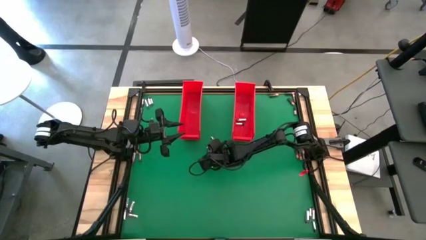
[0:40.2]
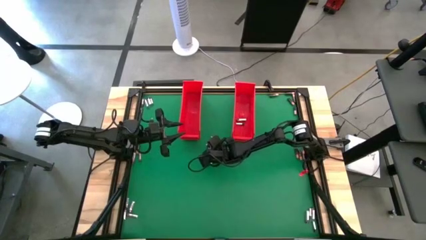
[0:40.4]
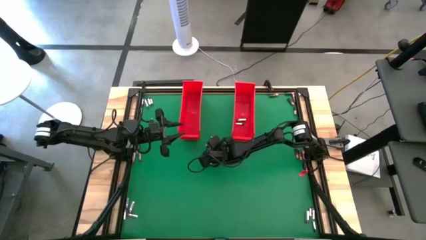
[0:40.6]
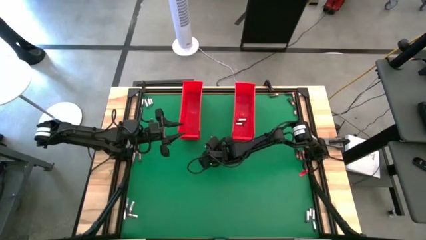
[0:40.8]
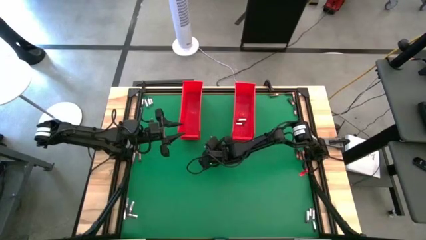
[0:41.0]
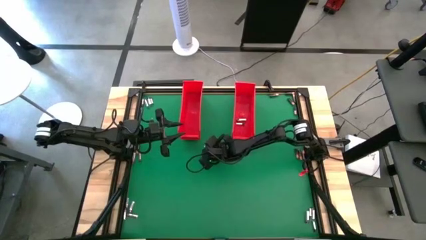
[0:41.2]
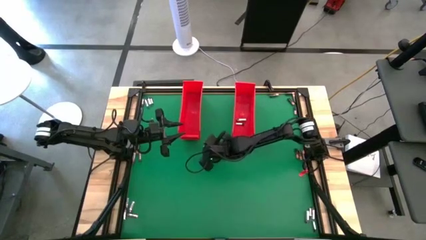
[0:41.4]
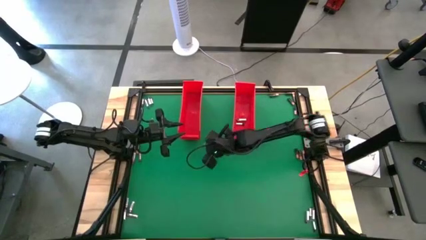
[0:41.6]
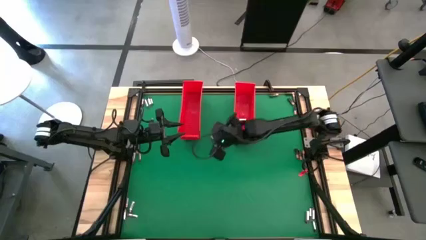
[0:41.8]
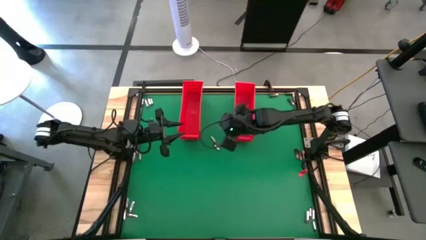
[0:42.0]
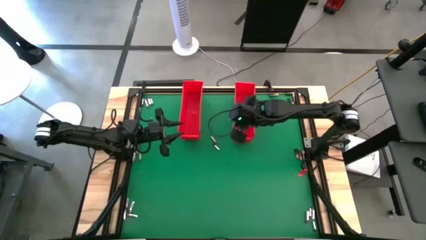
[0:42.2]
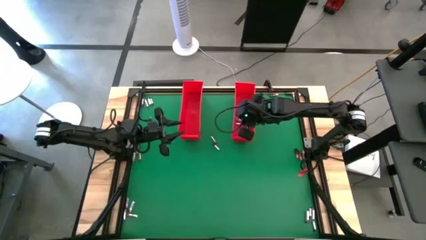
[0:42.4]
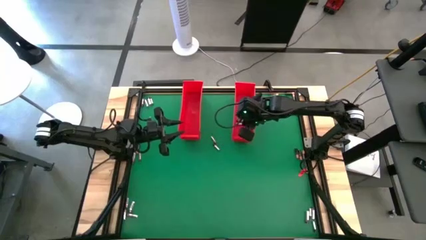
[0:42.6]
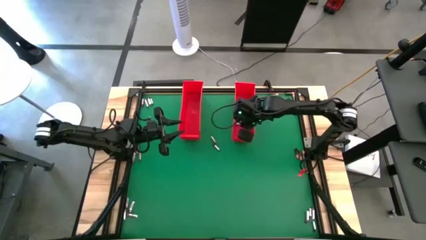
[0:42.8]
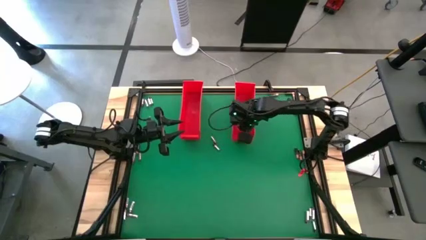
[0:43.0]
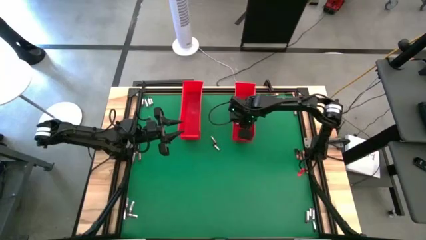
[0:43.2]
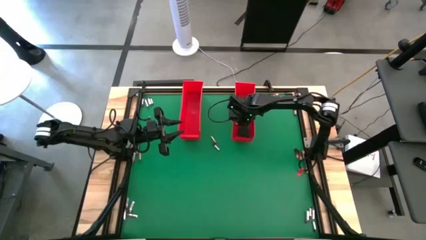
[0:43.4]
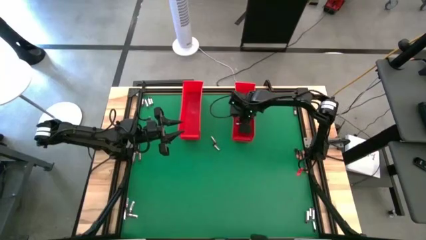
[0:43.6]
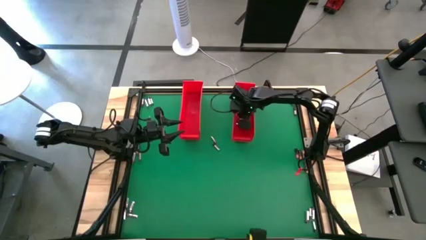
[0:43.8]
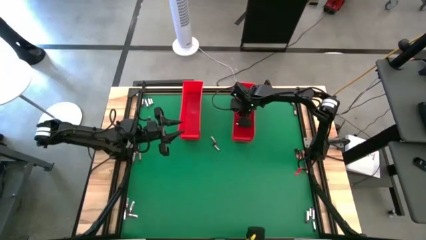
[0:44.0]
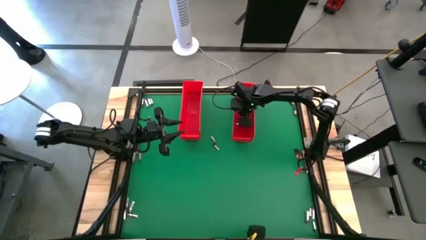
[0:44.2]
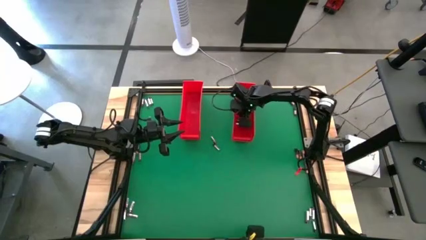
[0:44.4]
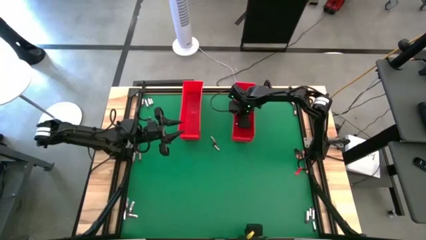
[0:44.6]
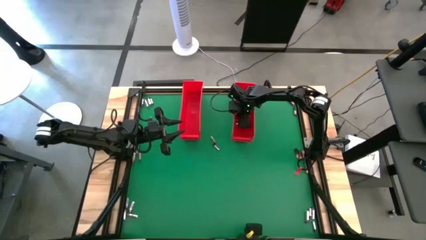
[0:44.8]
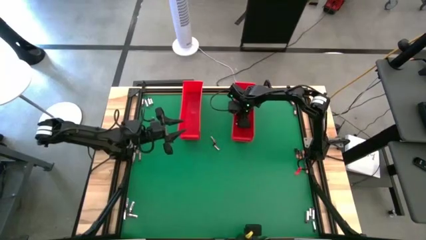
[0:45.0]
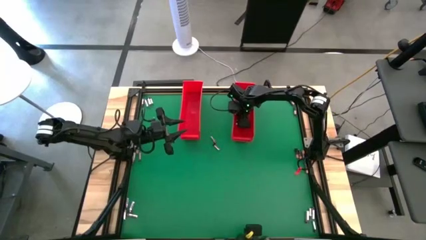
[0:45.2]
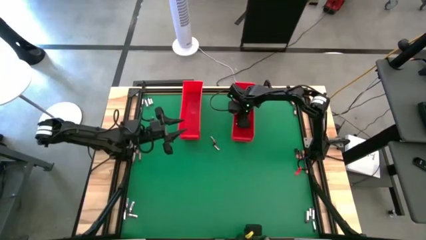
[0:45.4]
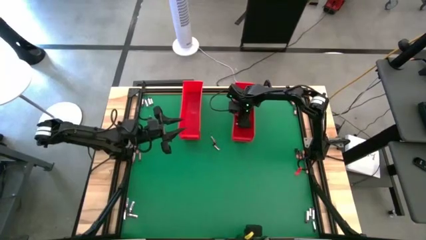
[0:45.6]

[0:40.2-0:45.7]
Task: Sort batteries
Put the silver battery into the right red bin

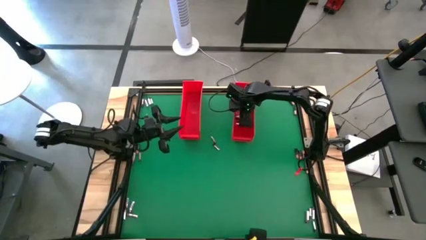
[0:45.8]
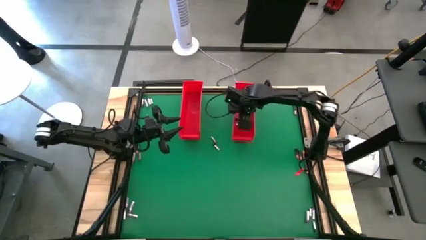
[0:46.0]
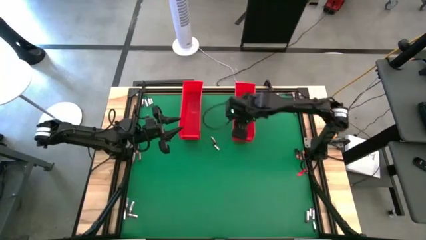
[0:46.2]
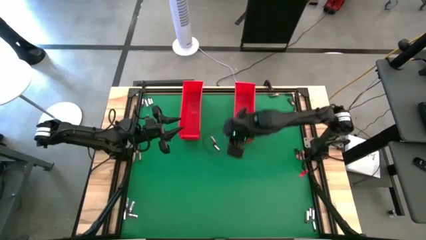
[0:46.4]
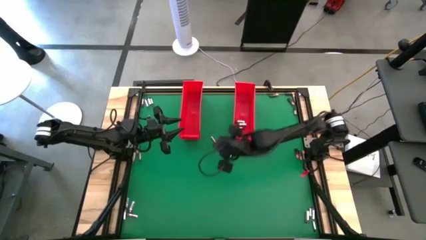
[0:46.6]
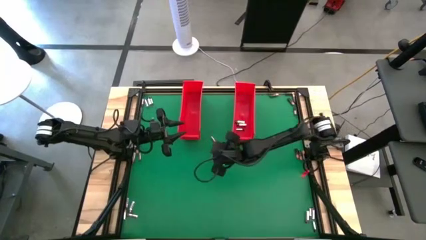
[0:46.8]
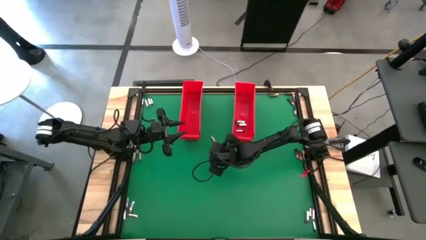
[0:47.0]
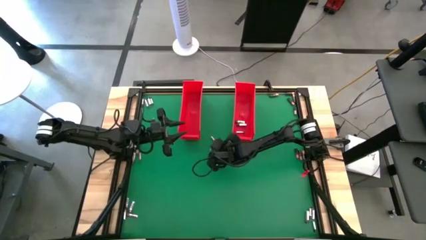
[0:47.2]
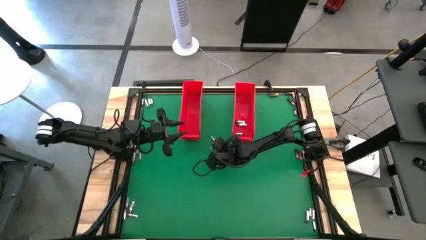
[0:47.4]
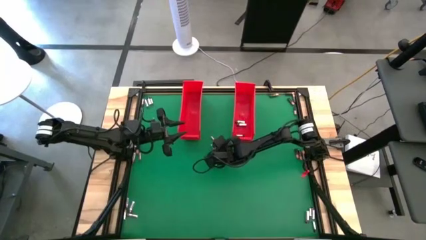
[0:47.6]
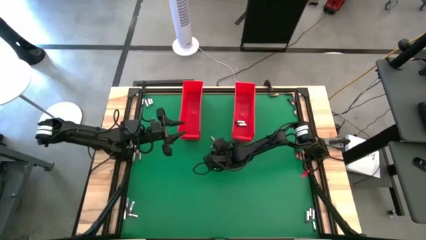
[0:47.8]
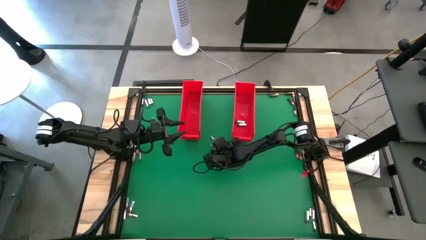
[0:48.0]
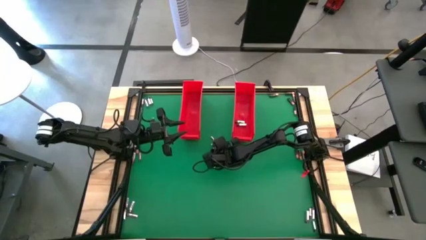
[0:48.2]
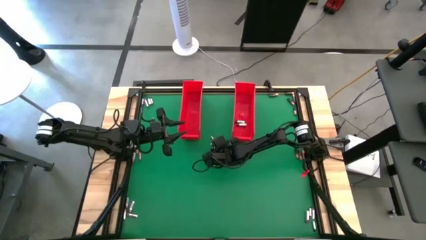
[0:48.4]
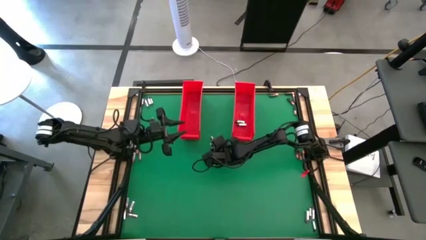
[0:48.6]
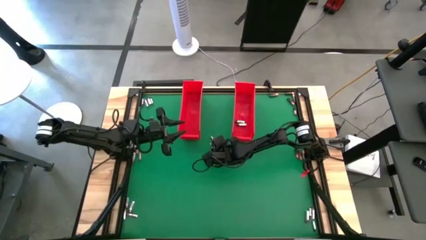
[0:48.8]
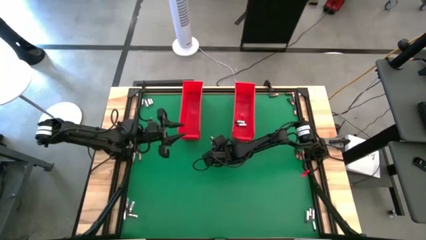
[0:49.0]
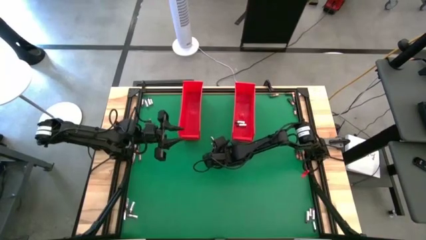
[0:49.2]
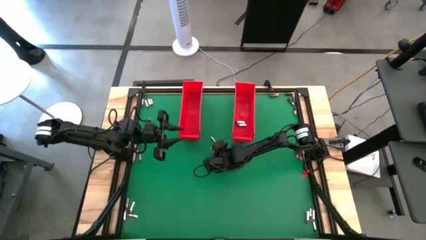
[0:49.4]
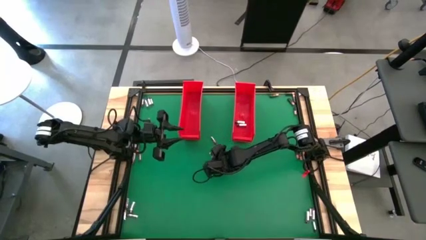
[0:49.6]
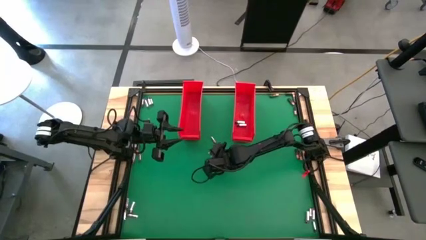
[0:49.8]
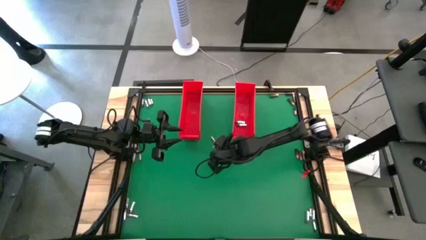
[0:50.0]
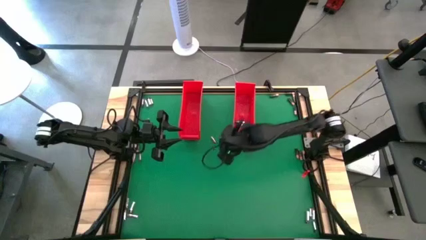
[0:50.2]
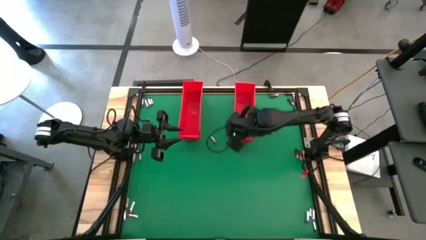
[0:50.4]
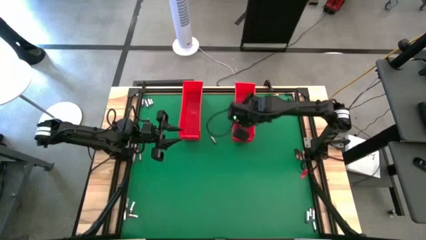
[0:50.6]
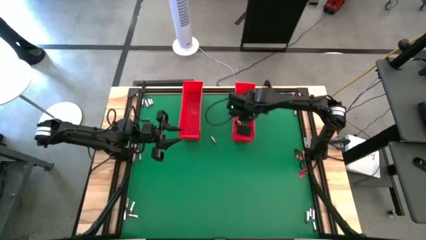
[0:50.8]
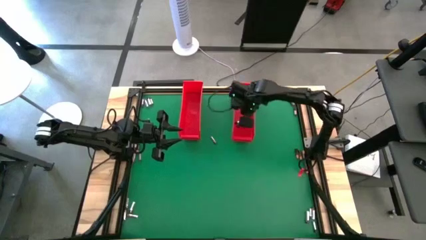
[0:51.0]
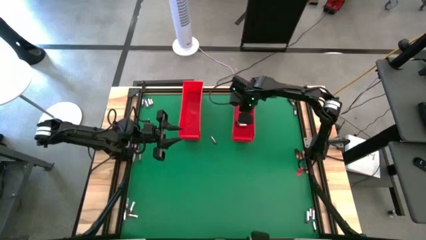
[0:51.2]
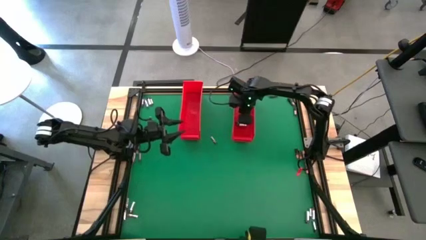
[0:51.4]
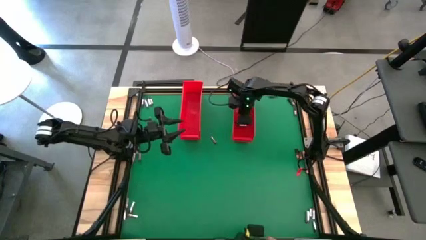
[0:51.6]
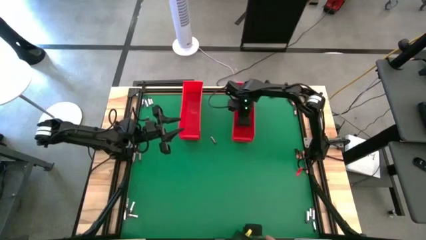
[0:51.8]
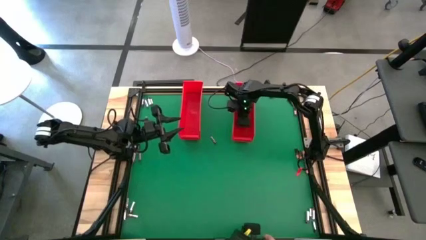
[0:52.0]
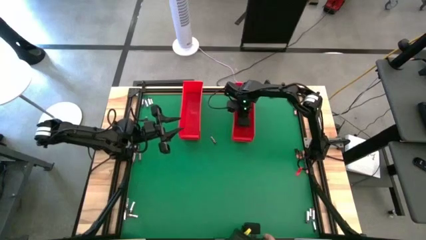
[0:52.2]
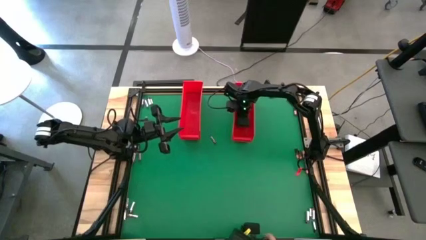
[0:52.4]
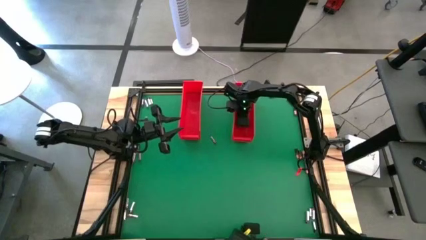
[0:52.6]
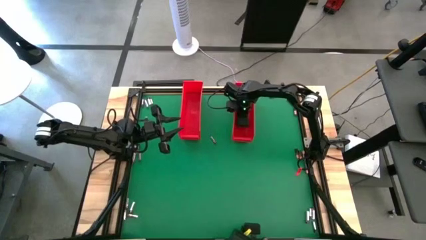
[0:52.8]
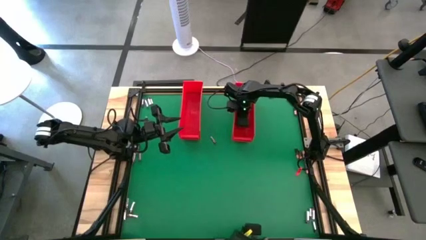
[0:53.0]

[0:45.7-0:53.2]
Put the silver battery into the right red bin

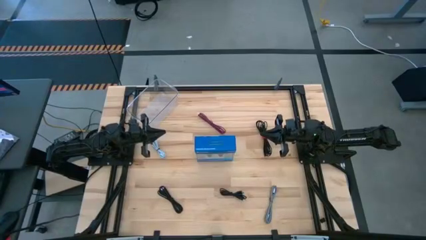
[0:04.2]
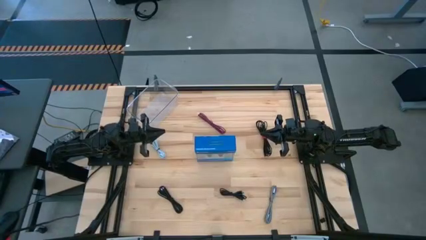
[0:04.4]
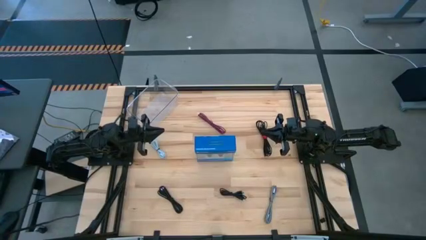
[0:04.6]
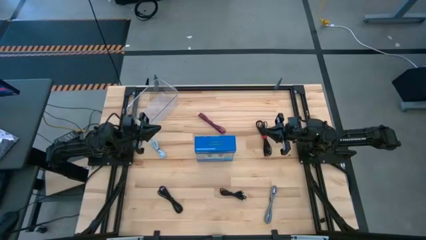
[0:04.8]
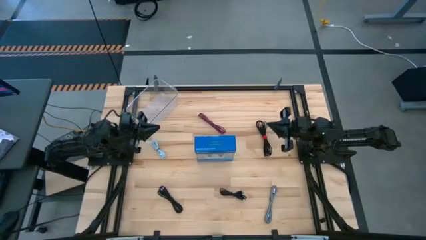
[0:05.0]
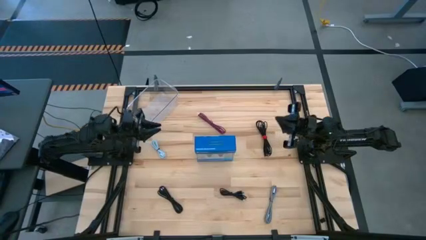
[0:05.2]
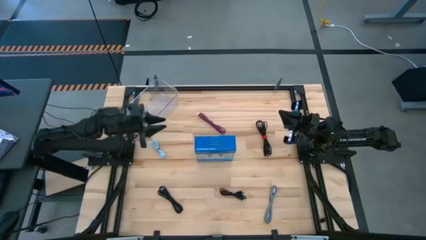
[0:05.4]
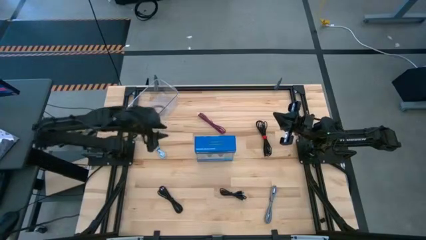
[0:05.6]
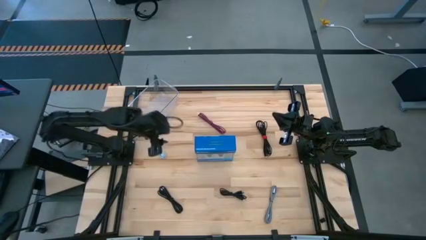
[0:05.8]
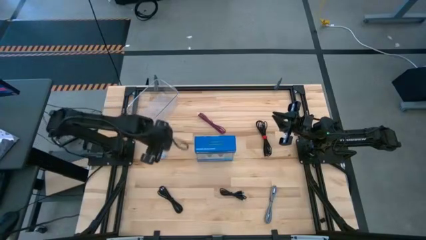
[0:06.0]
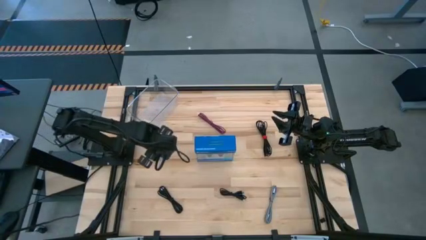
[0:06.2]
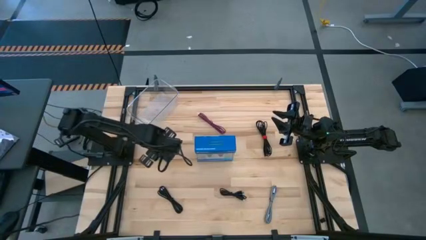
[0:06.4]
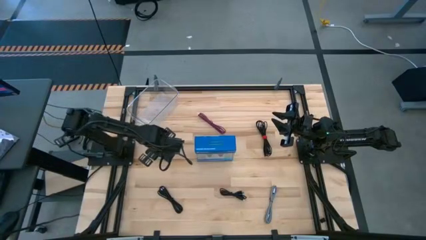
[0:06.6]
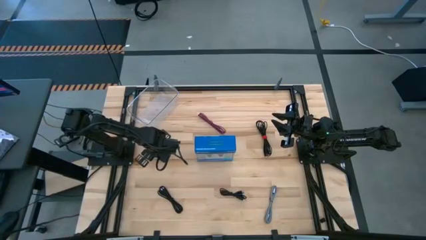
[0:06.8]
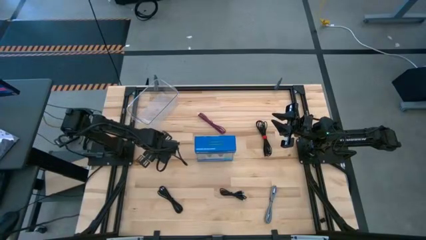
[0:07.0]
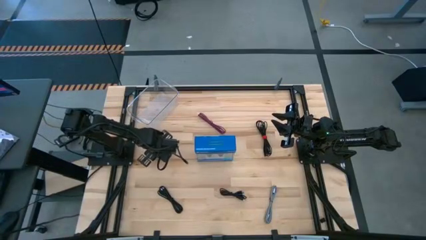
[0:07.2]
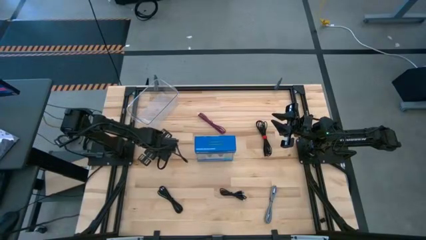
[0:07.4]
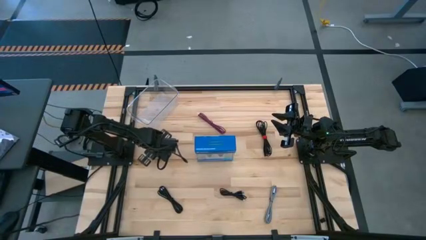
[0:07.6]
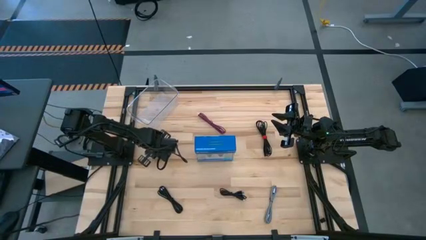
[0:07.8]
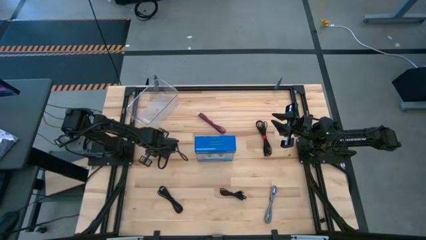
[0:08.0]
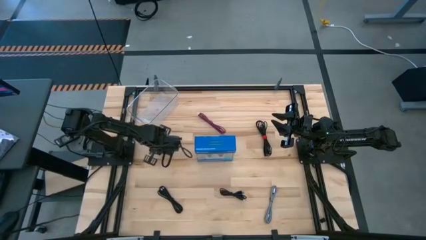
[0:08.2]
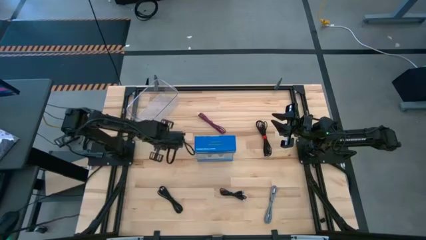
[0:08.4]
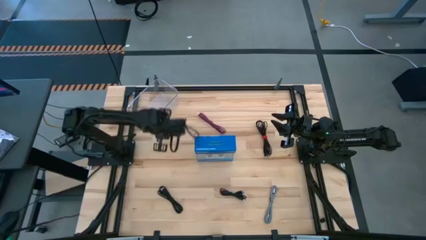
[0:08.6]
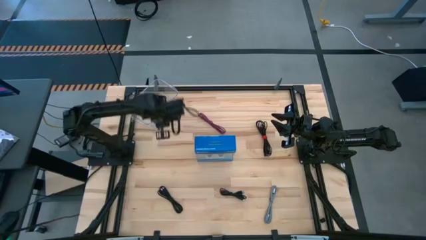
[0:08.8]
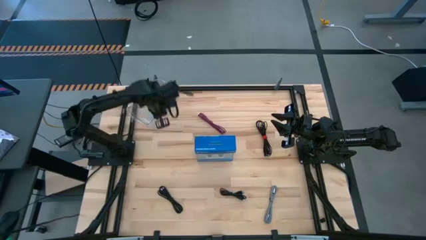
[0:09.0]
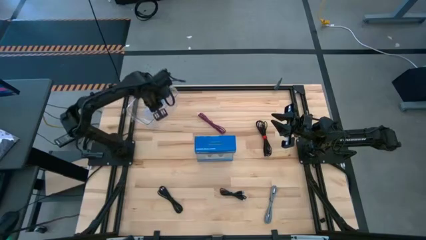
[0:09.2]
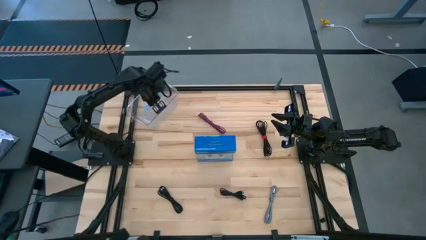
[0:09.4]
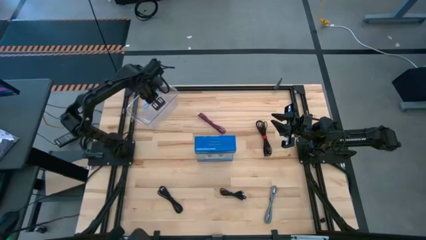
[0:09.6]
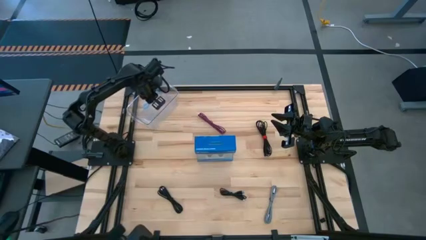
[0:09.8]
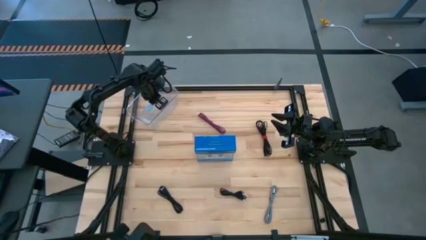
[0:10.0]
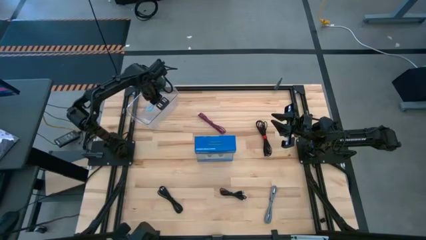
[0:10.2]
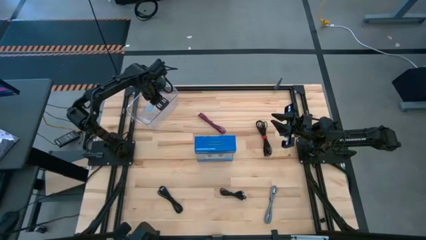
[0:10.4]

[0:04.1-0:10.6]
Task: Pick and place USB-C Cables
Put the blue charger cable into the transparent bin
